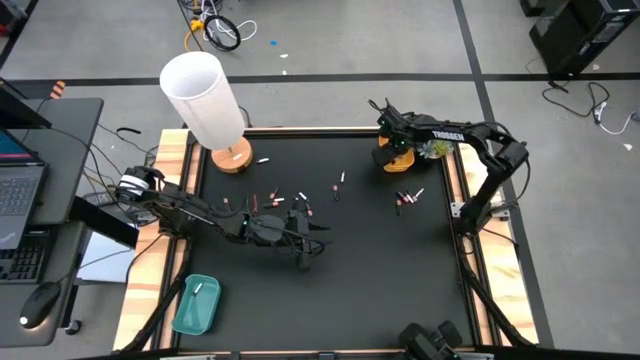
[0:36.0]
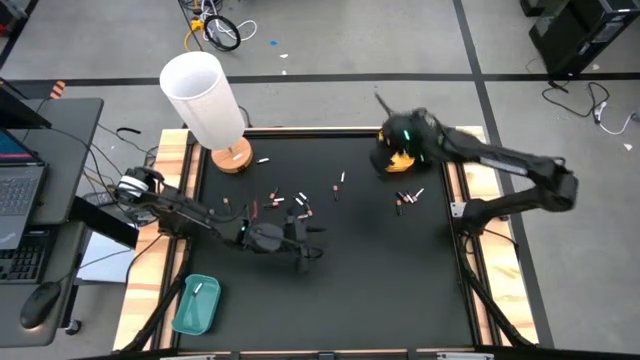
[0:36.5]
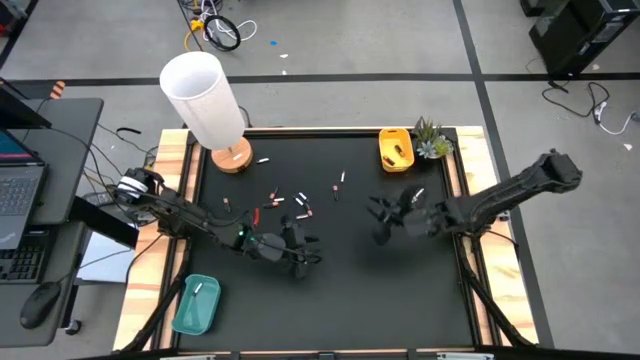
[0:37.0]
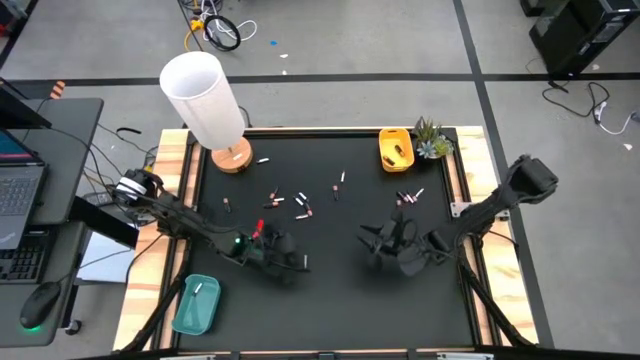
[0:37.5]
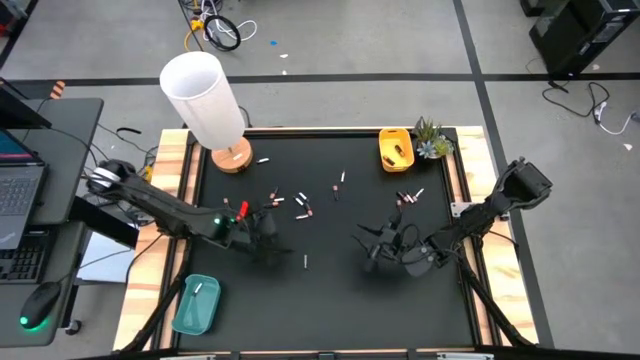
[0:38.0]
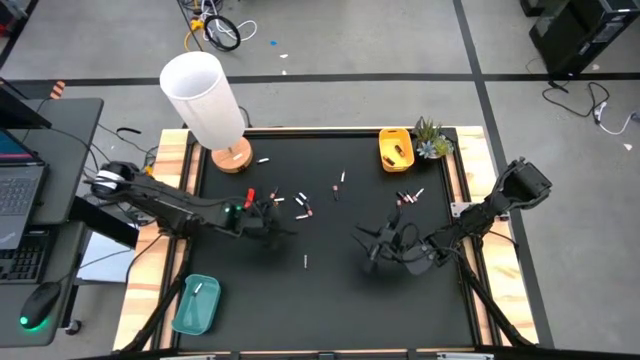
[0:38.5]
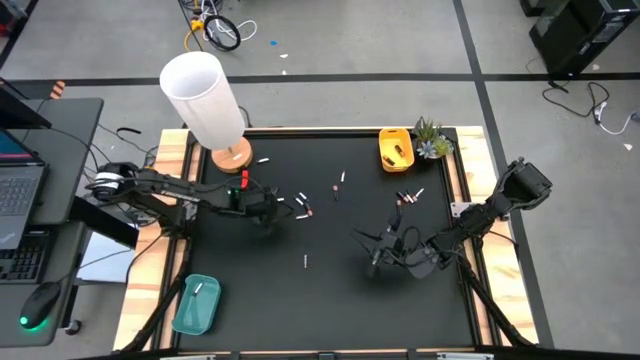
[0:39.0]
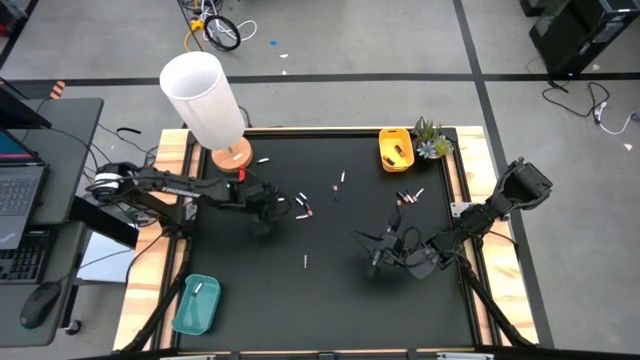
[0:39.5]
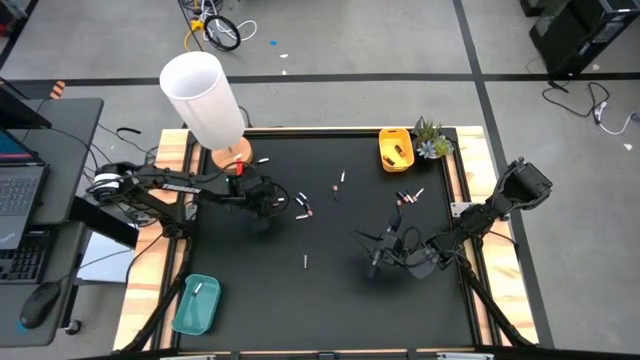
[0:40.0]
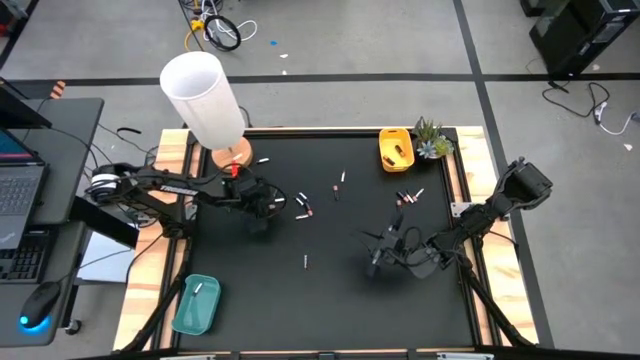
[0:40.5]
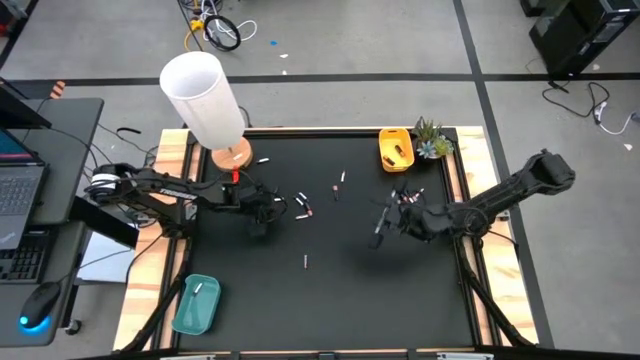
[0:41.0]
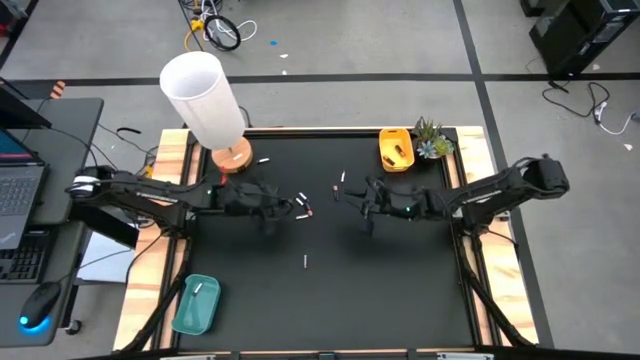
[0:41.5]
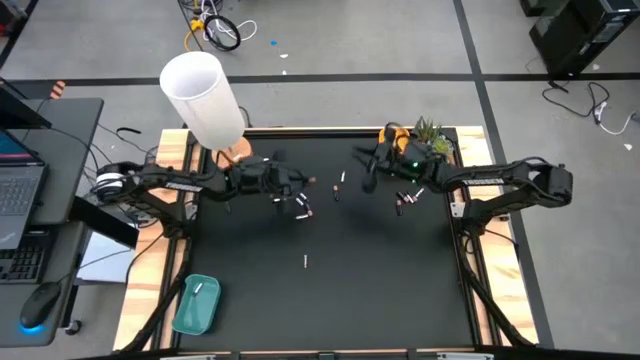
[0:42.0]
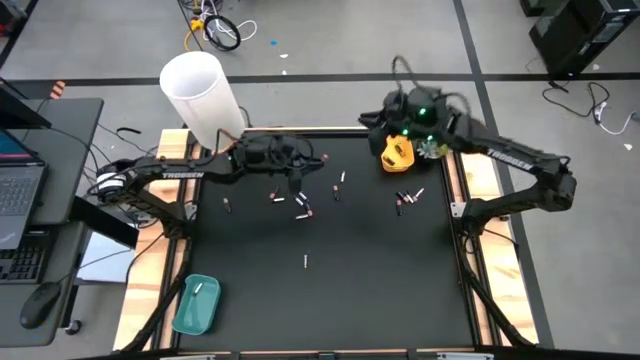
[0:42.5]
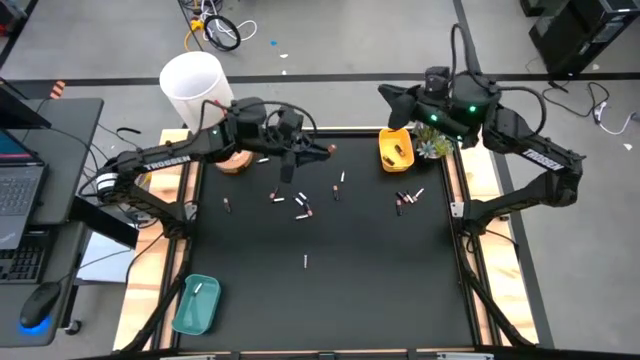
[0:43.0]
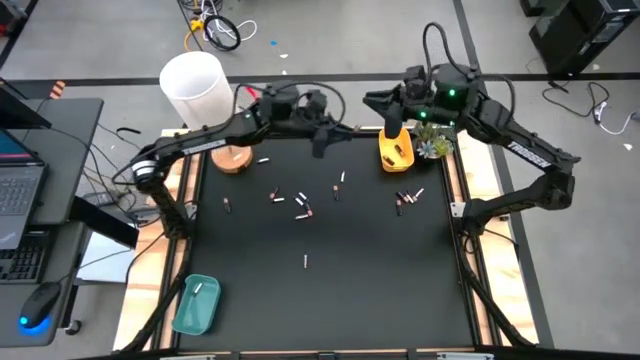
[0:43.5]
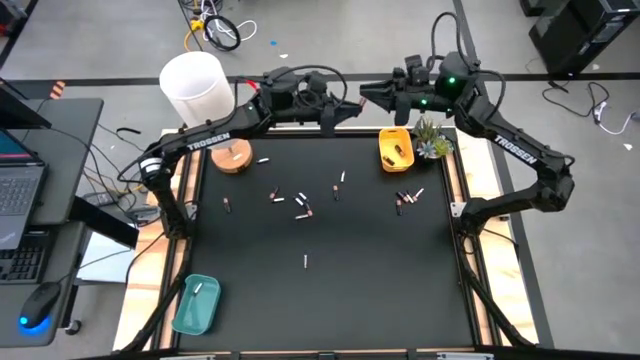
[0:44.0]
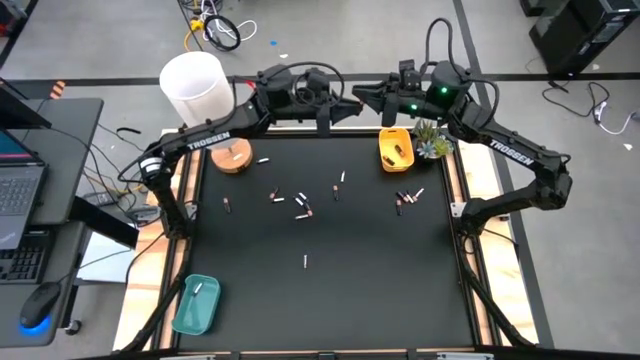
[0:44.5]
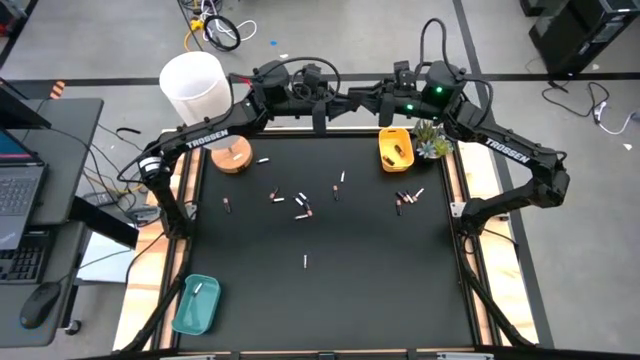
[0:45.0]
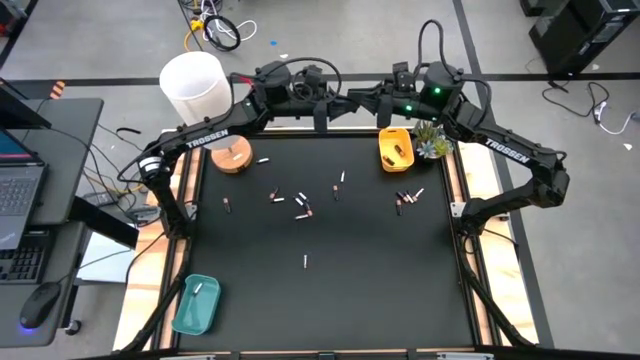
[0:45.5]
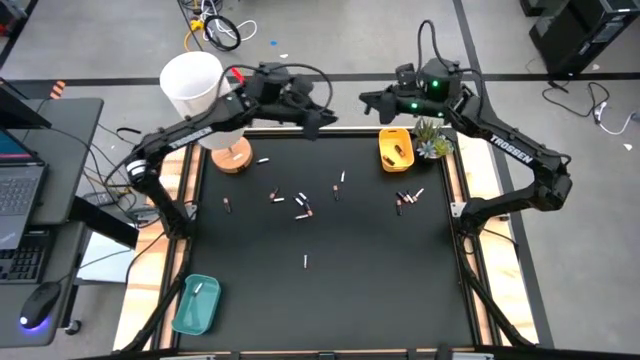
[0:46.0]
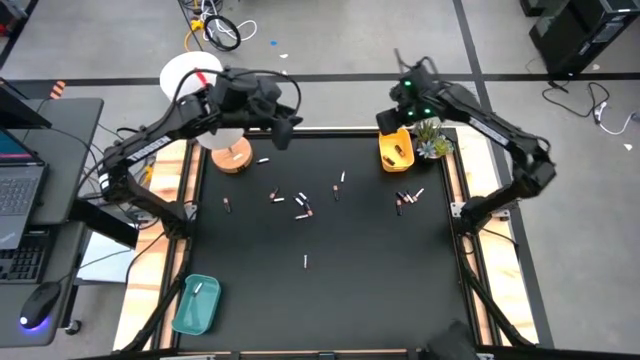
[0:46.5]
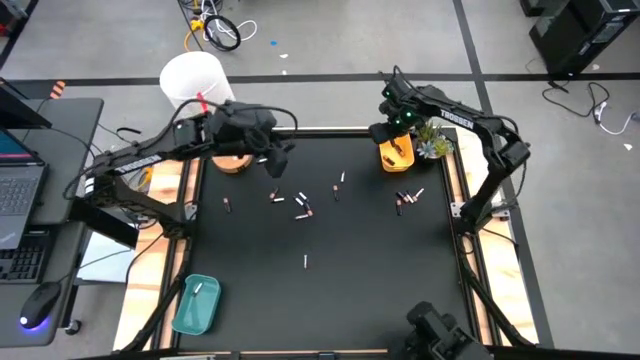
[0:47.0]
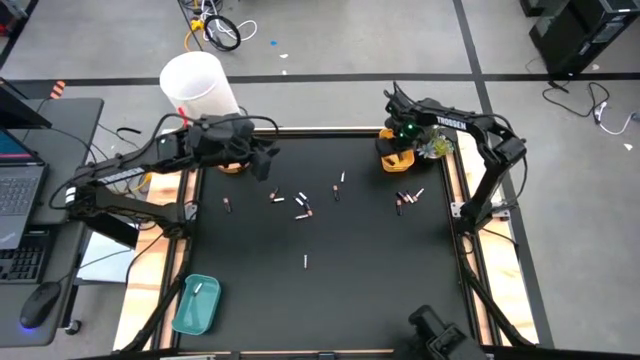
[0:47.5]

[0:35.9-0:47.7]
Task: Sort batteries
Put the black battery into the yellow bin

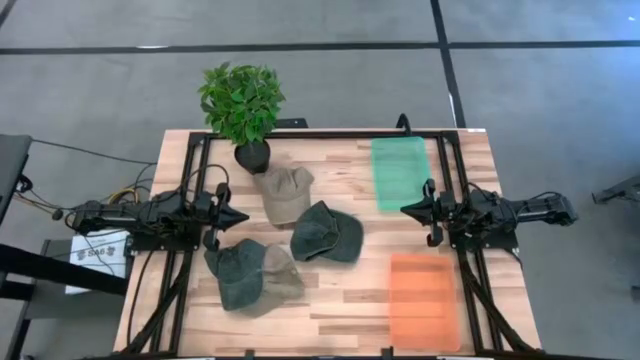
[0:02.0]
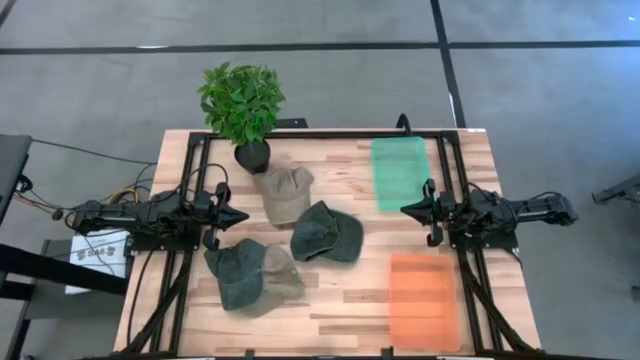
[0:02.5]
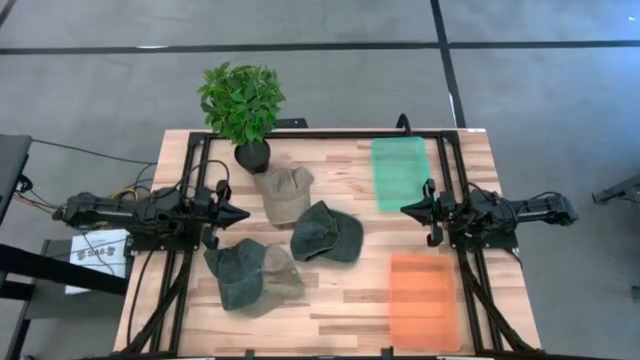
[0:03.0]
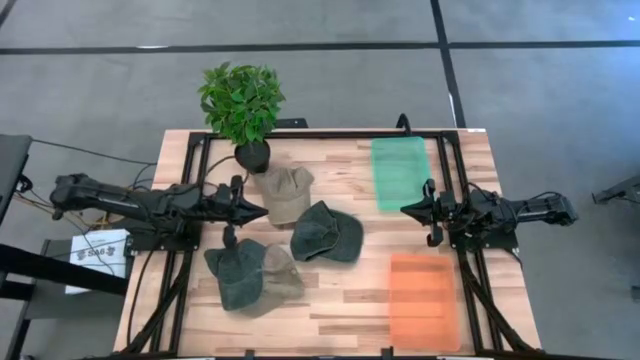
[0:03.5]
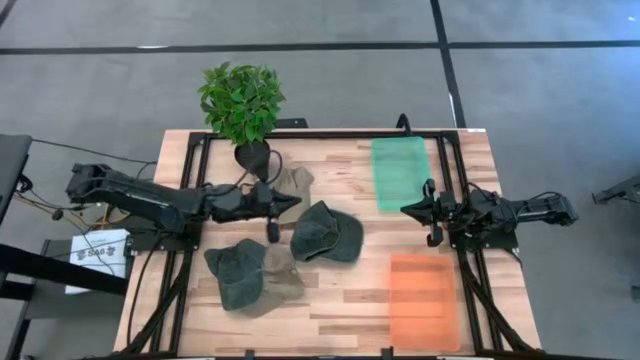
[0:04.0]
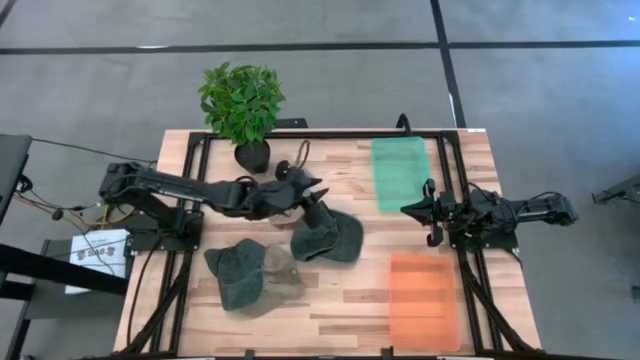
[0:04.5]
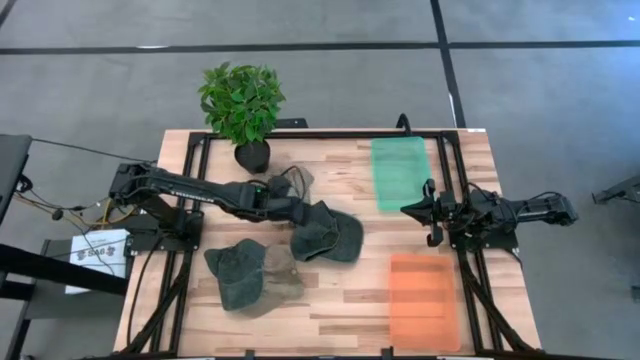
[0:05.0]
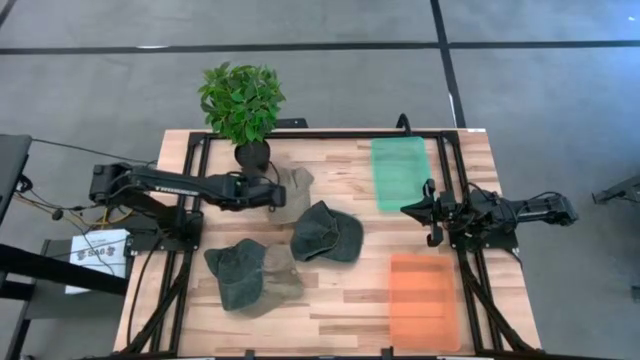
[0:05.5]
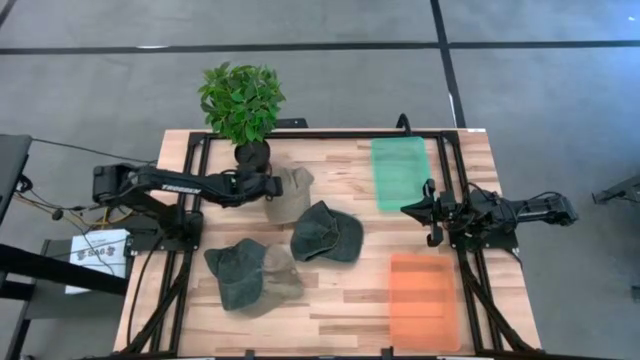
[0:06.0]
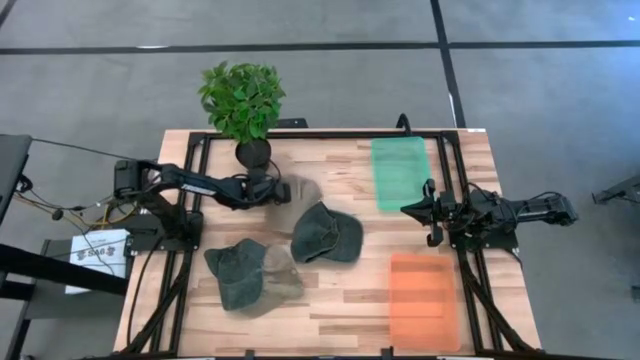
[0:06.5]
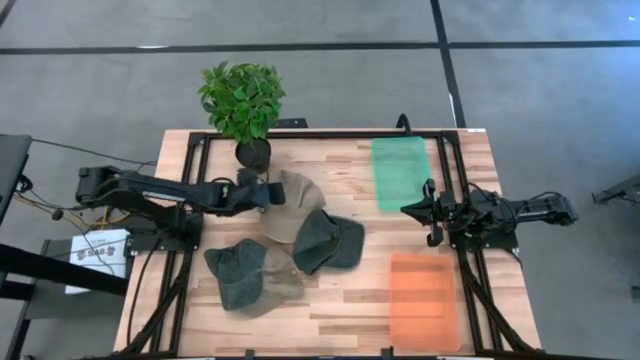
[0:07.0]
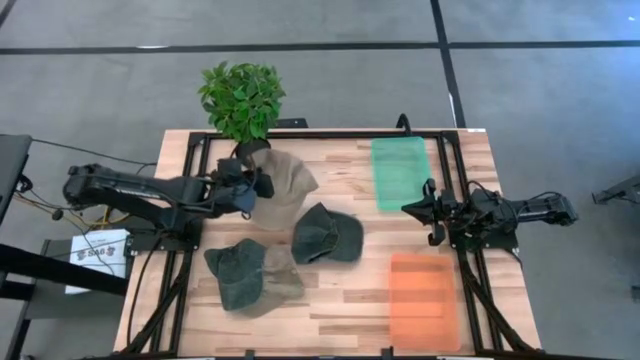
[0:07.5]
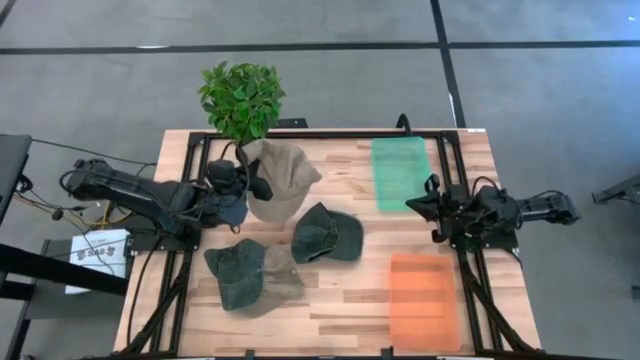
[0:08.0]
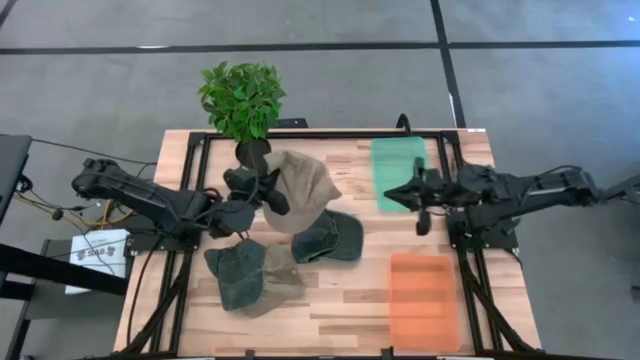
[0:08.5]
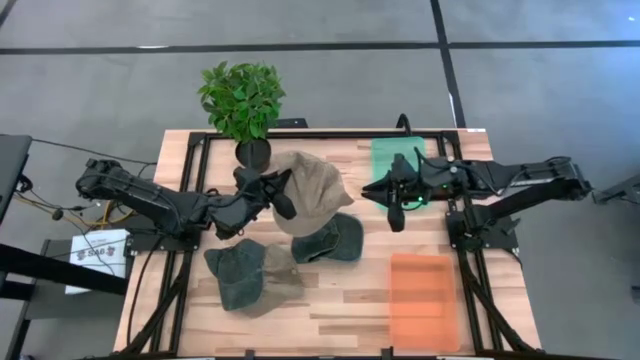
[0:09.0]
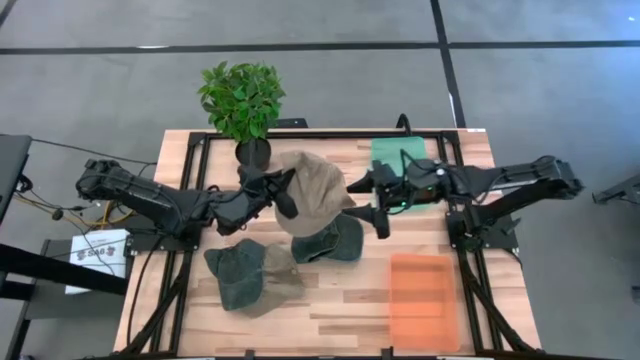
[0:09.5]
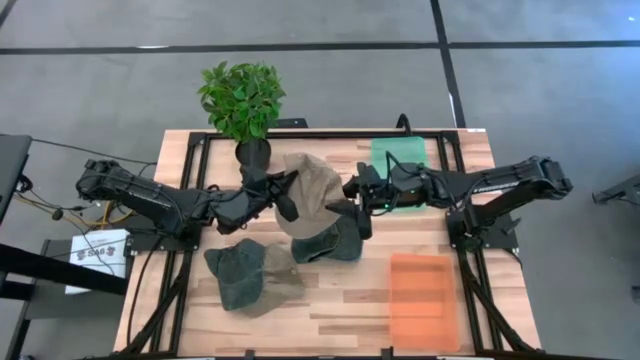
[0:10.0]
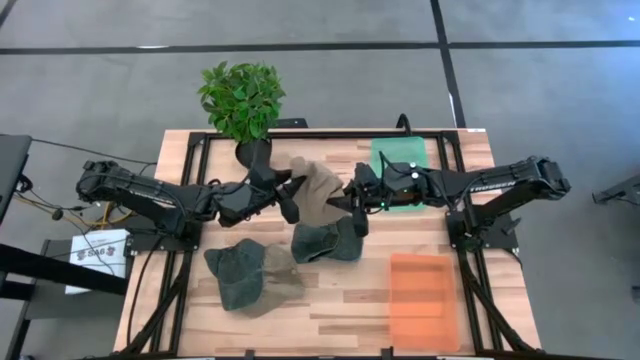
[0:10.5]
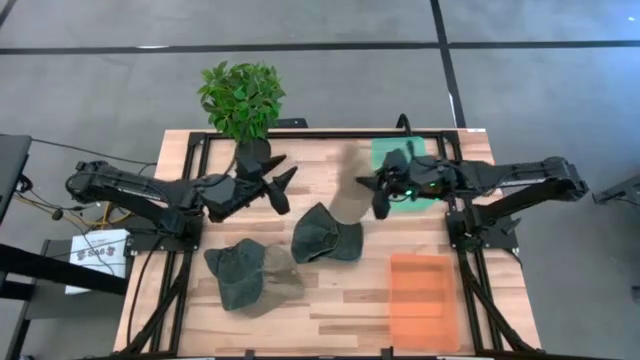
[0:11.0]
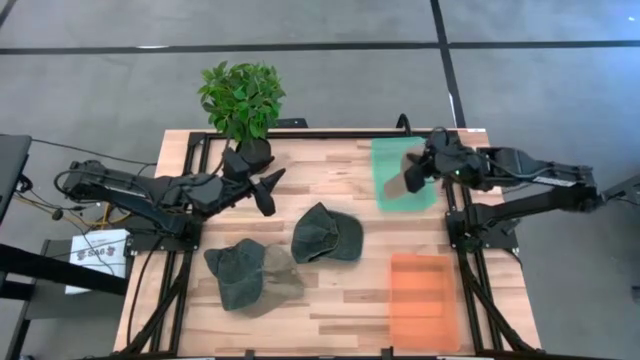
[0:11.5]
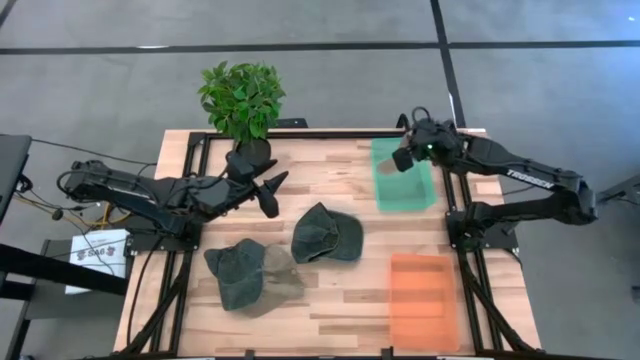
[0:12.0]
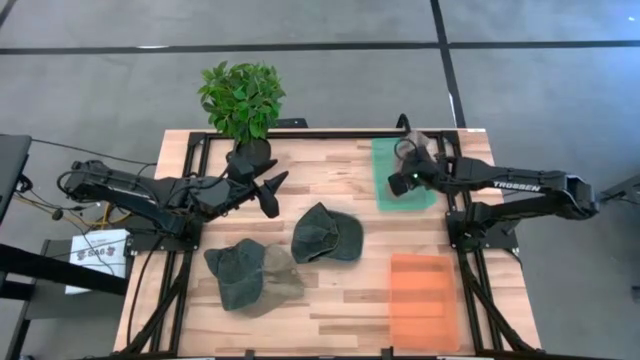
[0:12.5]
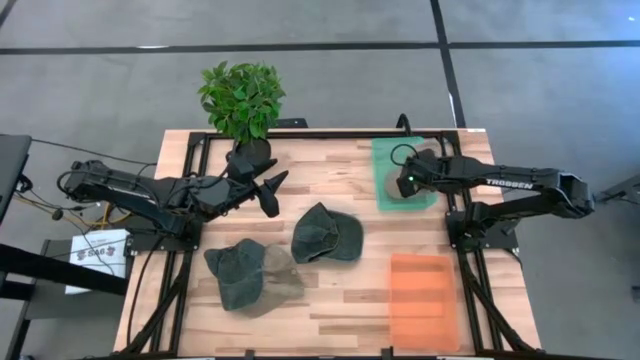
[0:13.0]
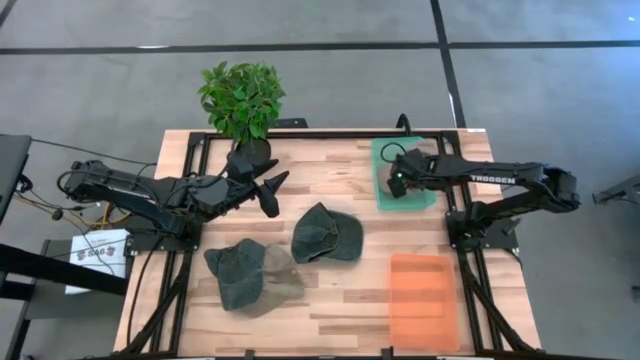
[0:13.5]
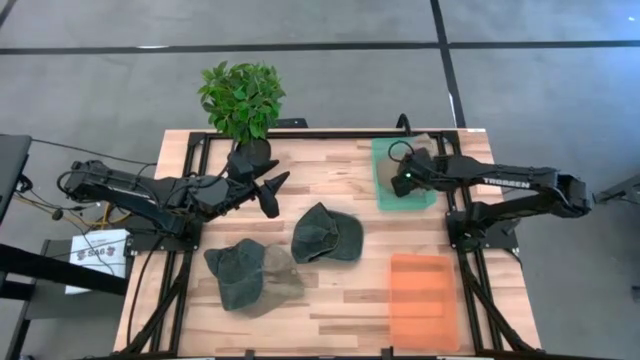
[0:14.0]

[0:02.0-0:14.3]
Task: Pick & Place hat
Put the top brown cap into the green bin
